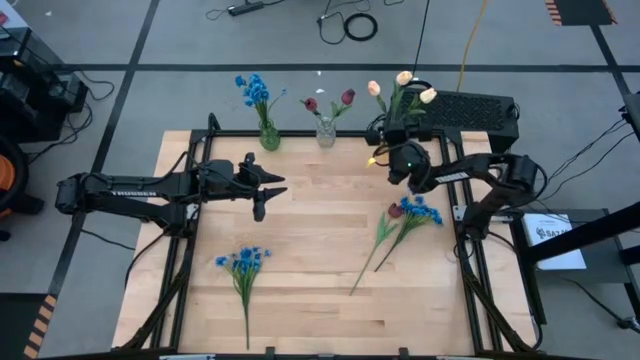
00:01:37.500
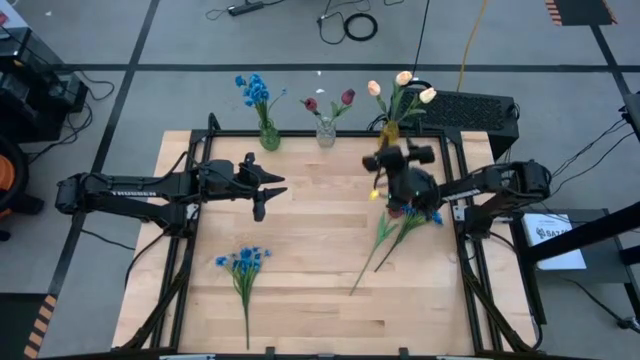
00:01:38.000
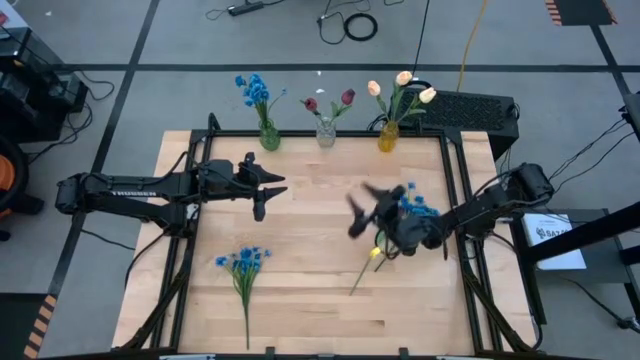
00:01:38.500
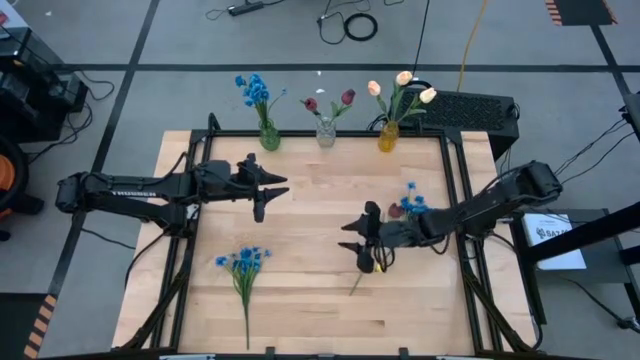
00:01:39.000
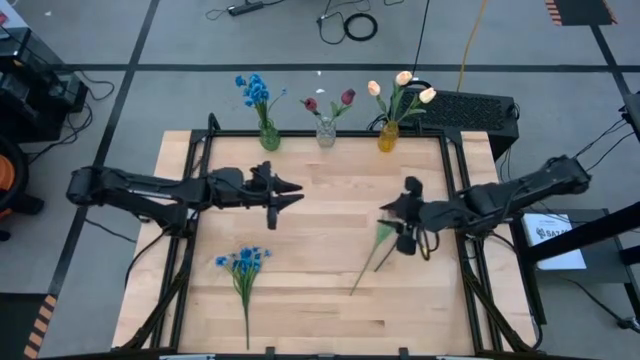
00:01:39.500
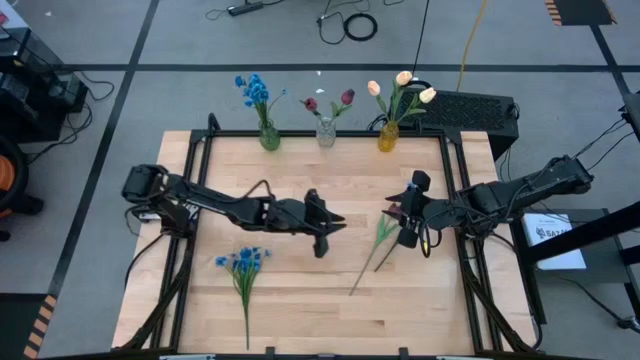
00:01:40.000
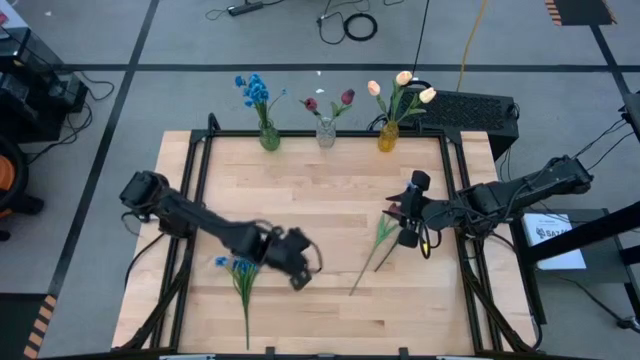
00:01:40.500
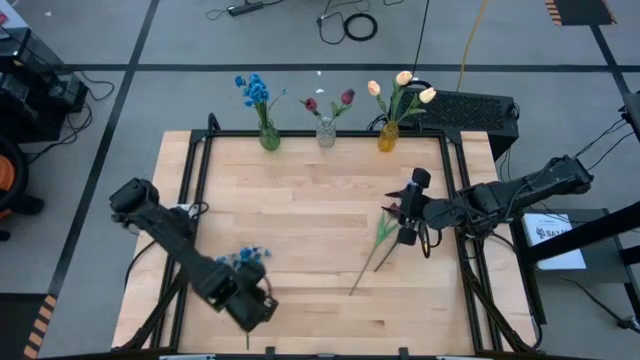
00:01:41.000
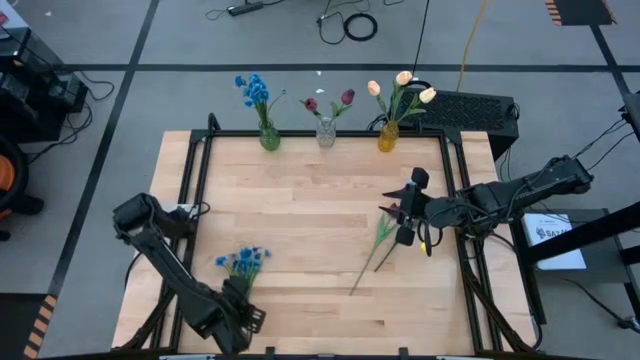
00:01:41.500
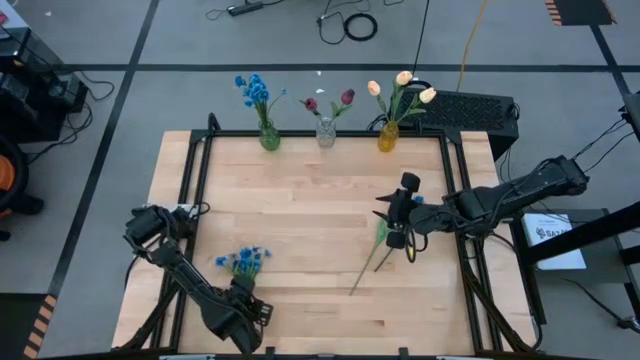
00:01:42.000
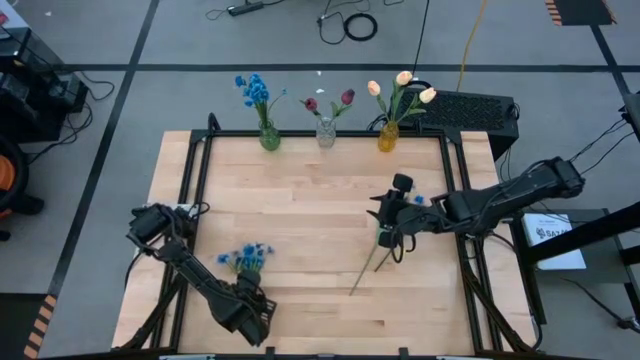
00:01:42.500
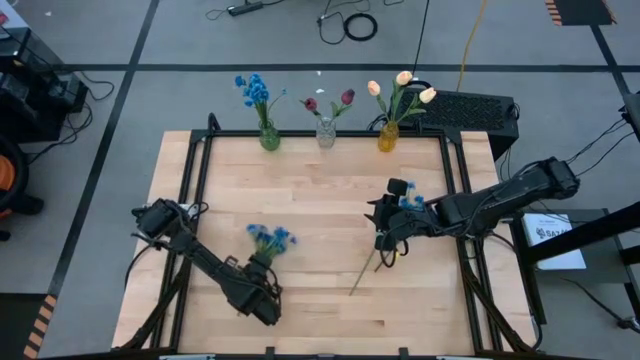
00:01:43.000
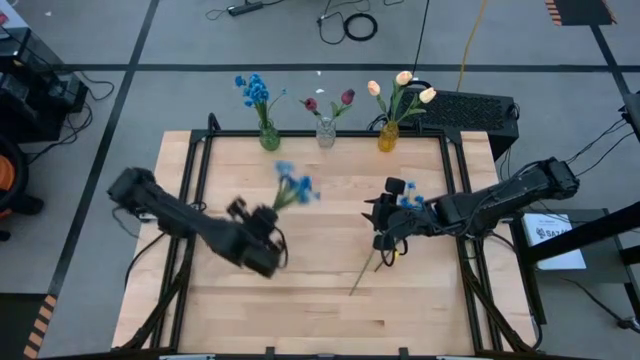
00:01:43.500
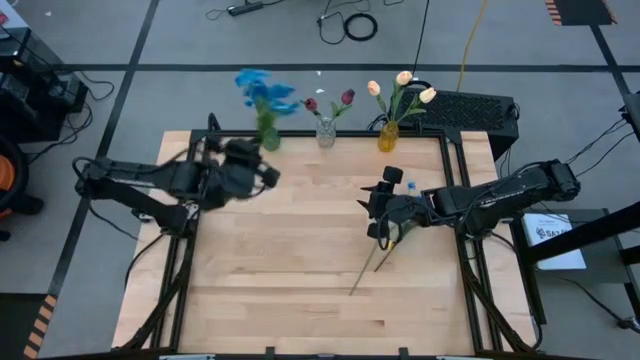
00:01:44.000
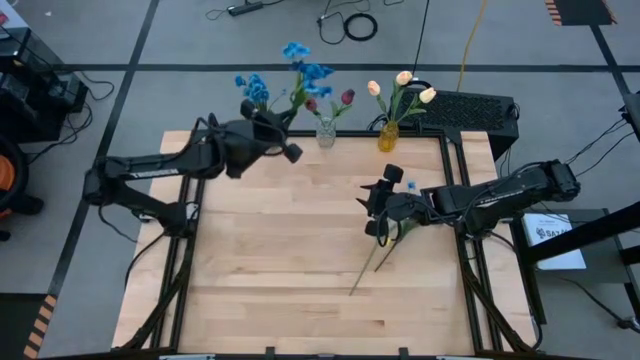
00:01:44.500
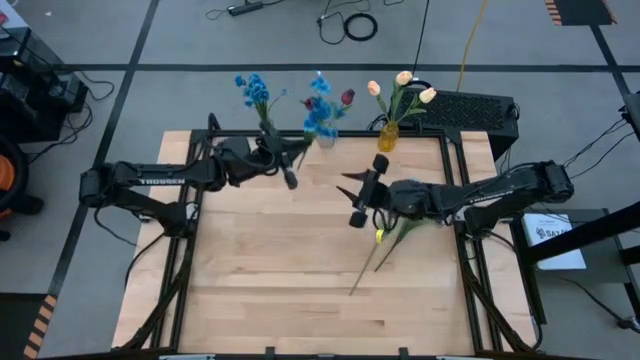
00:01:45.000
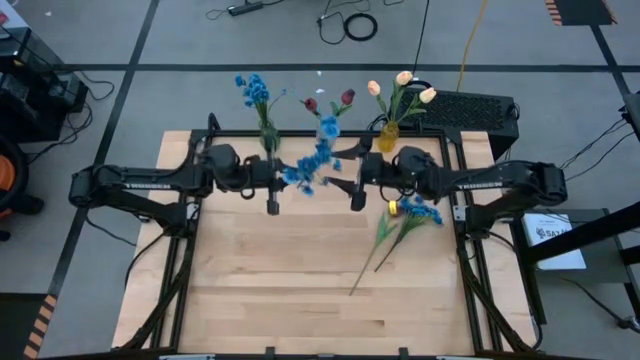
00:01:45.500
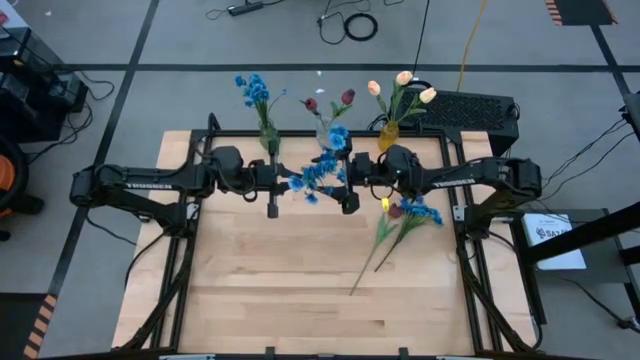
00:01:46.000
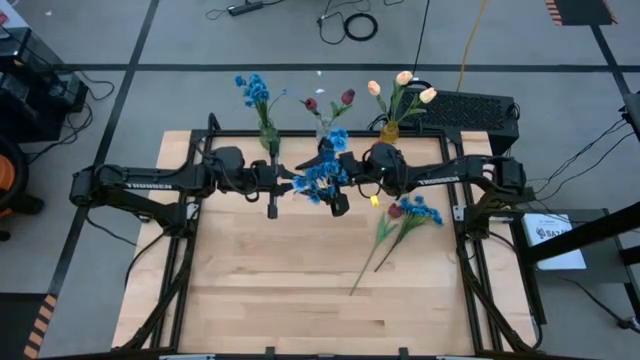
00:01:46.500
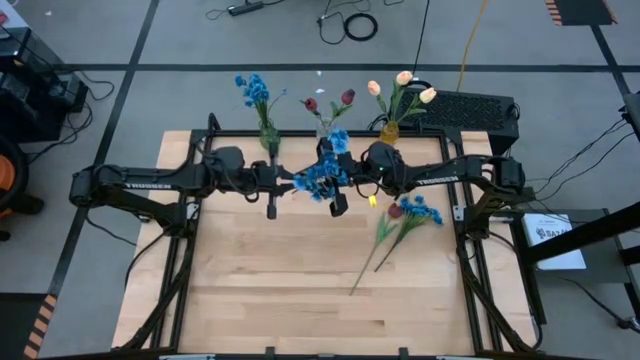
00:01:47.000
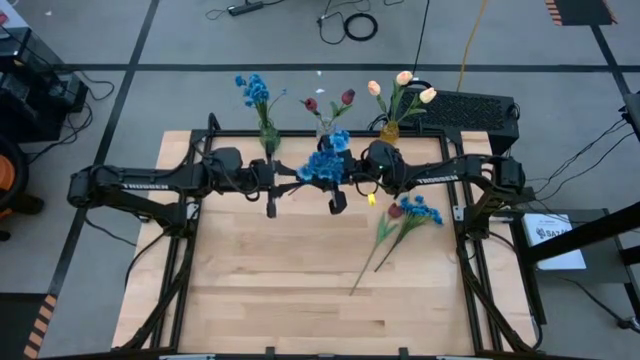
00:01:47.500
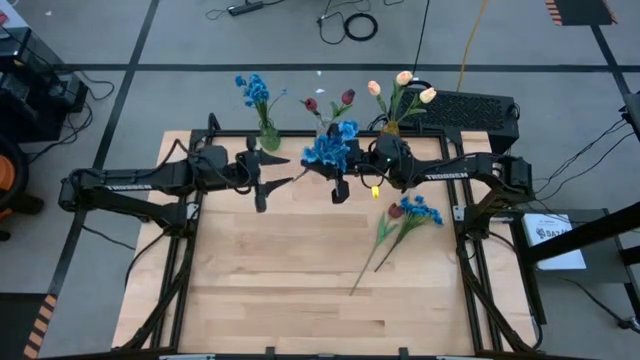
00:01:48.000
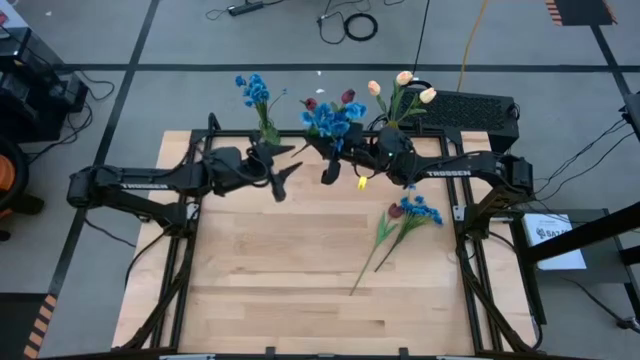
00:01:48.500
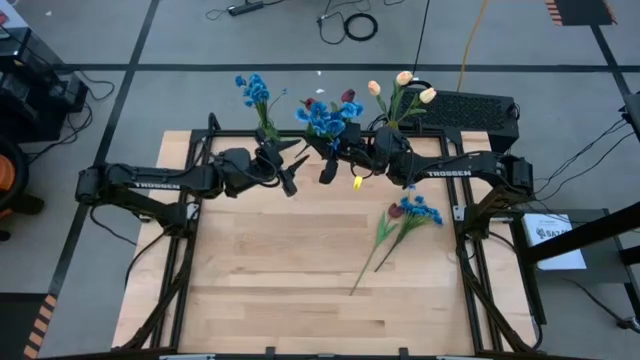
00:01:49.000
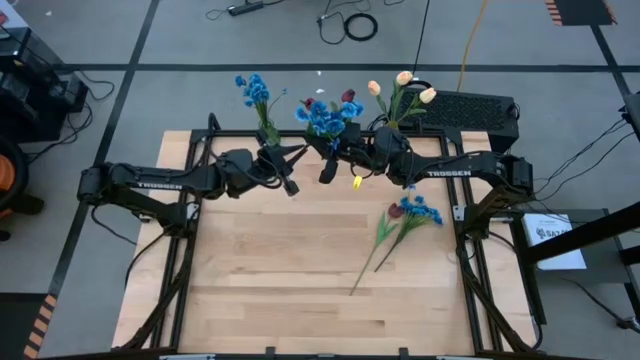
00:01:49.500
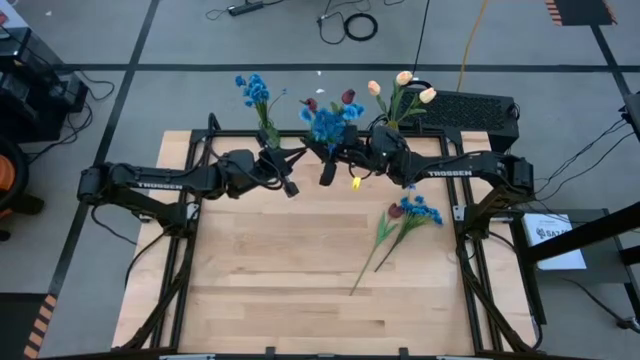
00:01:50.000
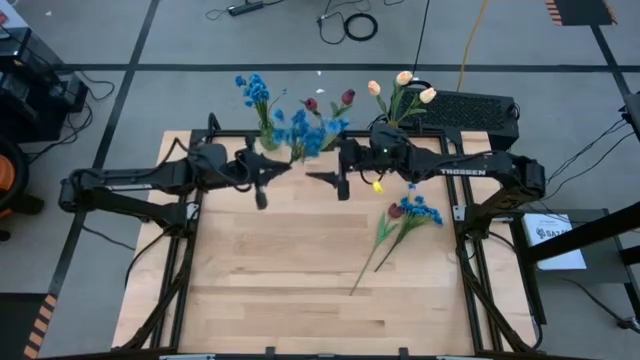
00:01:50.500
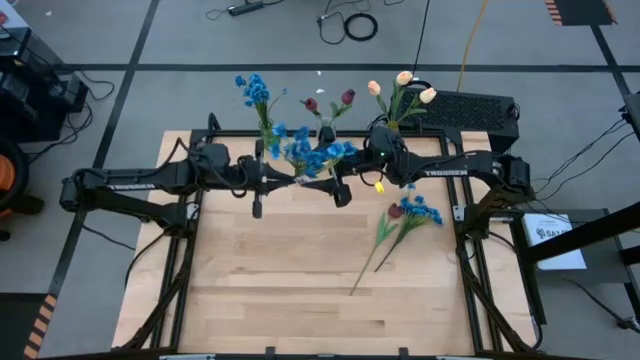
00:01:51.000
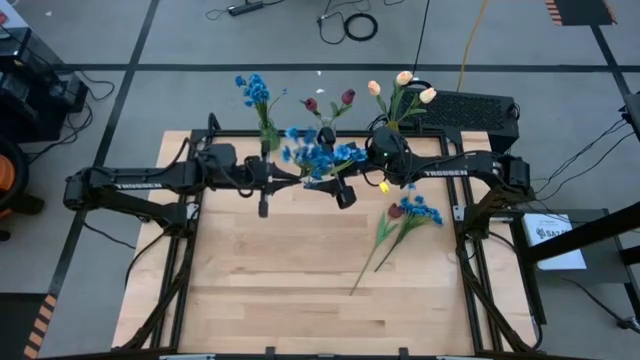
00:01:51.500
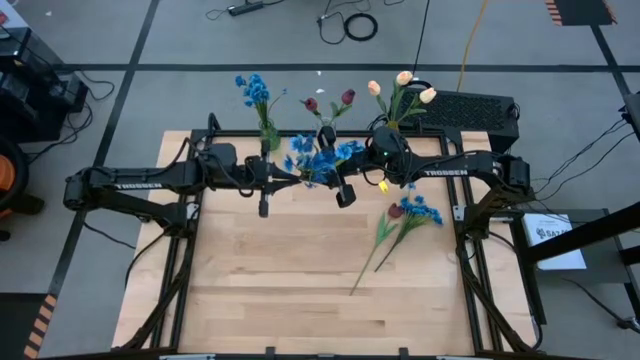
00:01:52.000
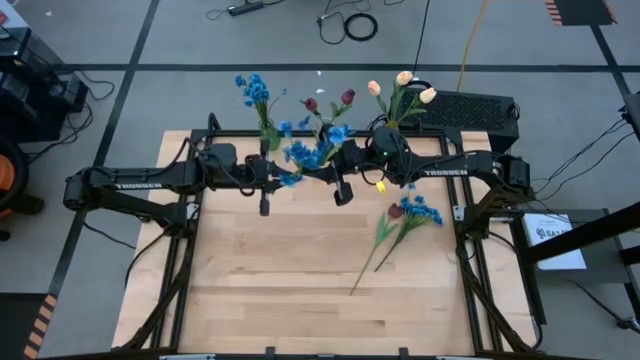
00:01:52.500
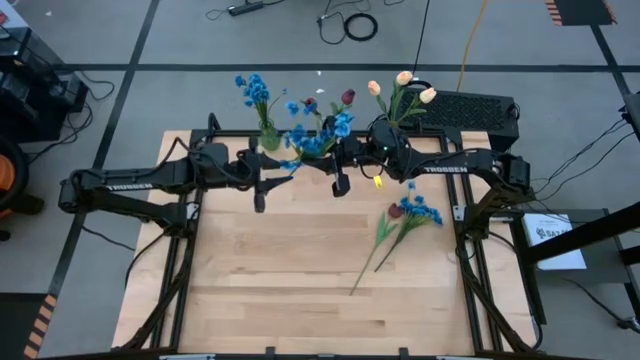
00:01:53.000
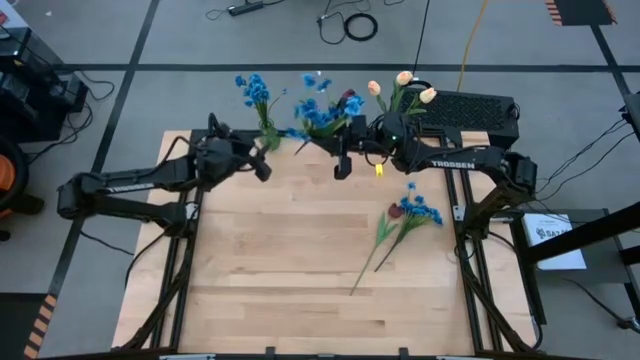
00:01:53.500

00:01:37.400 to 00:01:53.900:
Task: Sort flowers into vase by color
Put the left blue flowers into the green vase

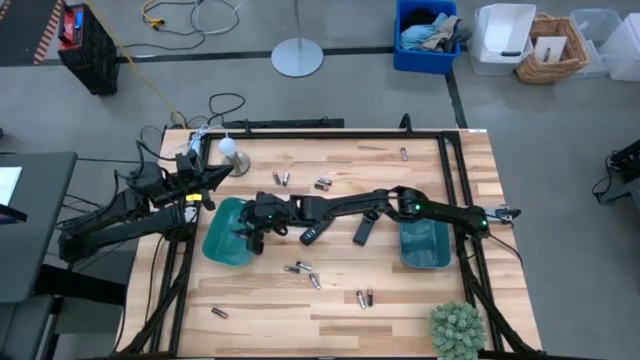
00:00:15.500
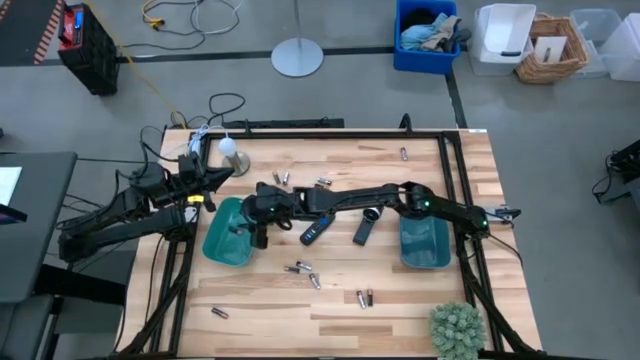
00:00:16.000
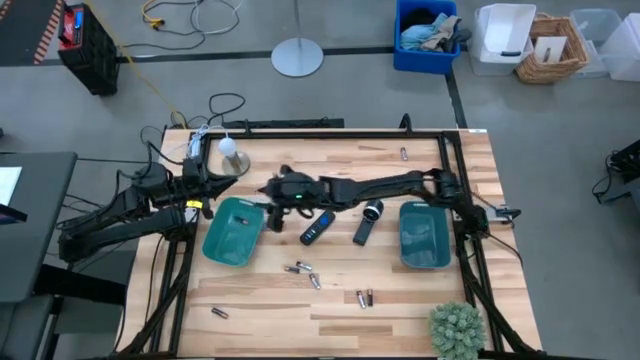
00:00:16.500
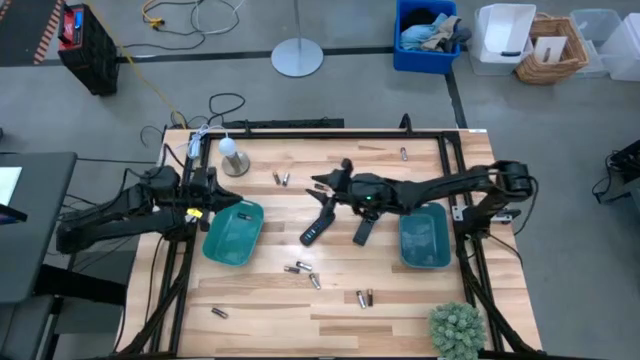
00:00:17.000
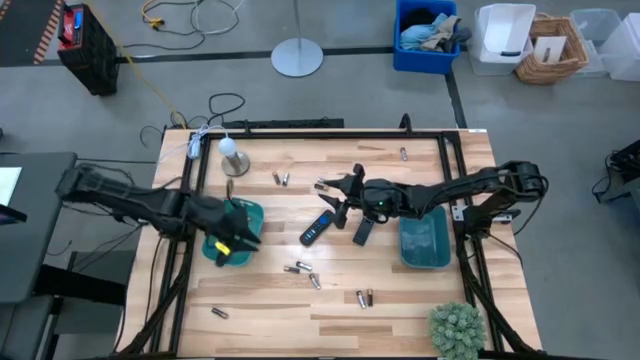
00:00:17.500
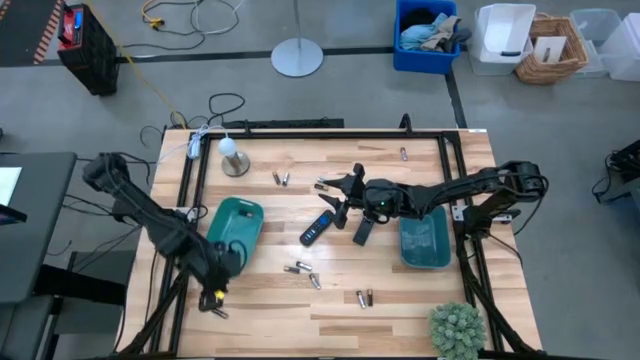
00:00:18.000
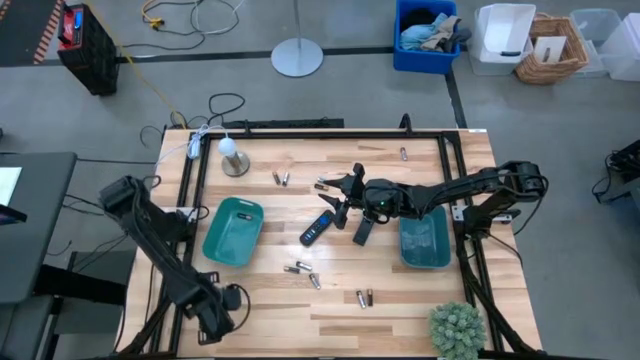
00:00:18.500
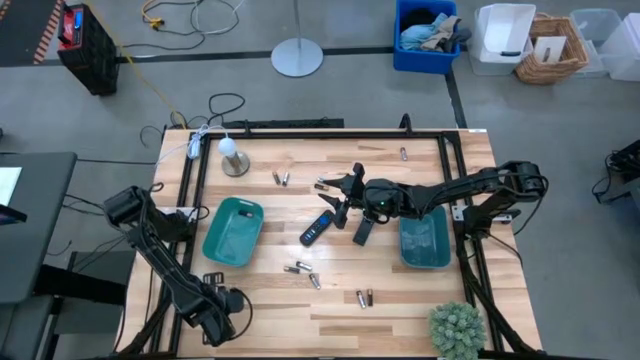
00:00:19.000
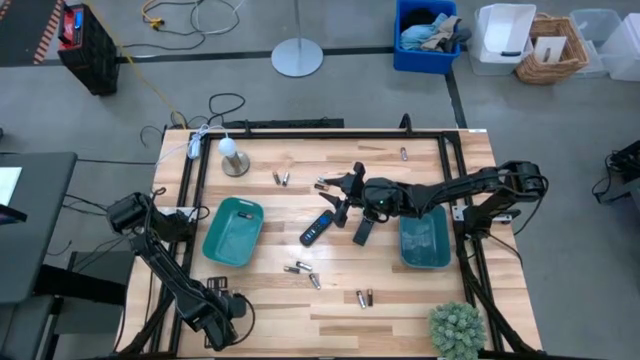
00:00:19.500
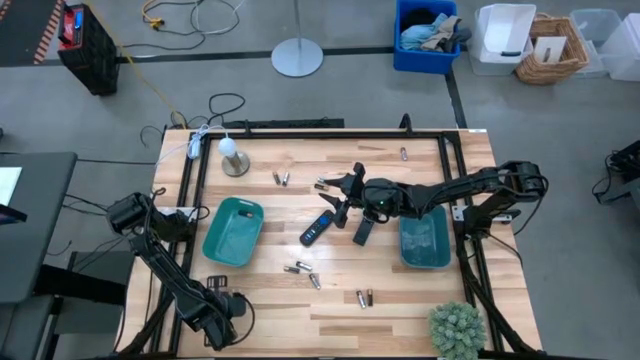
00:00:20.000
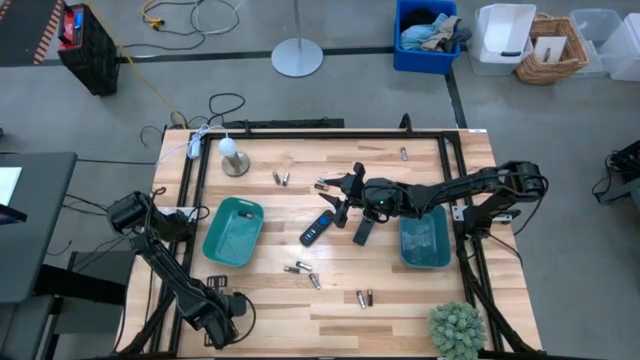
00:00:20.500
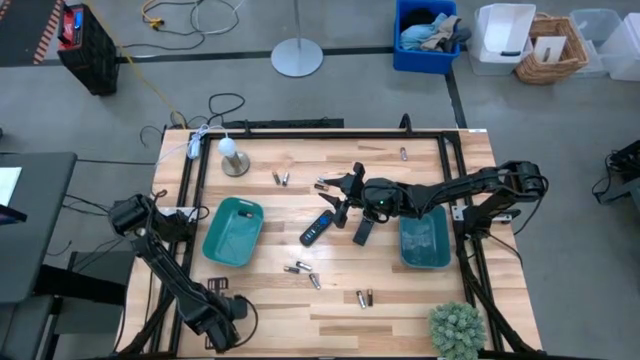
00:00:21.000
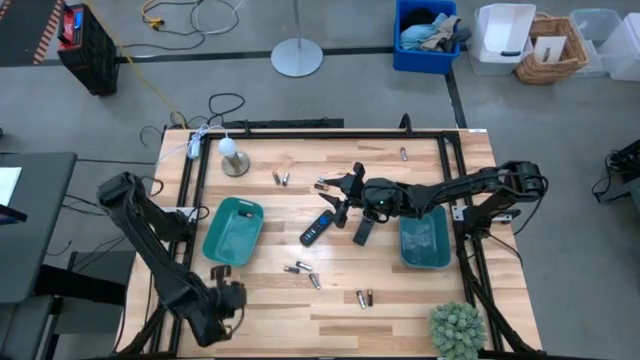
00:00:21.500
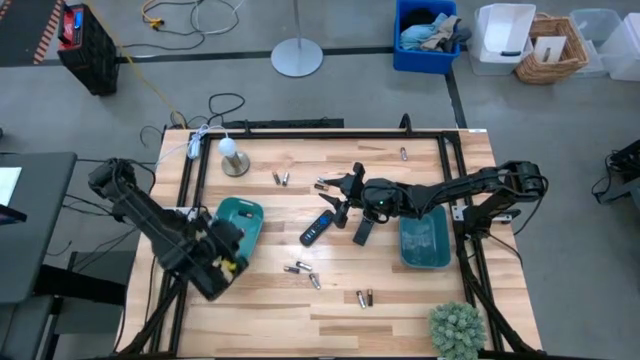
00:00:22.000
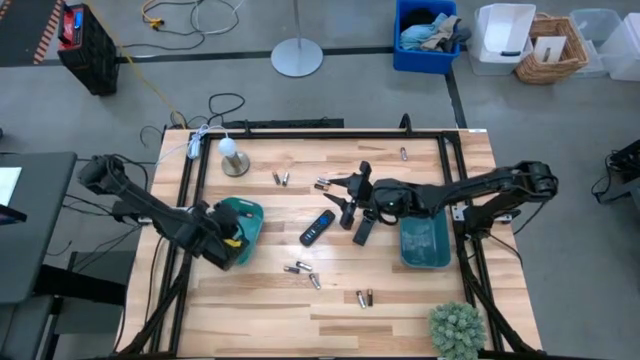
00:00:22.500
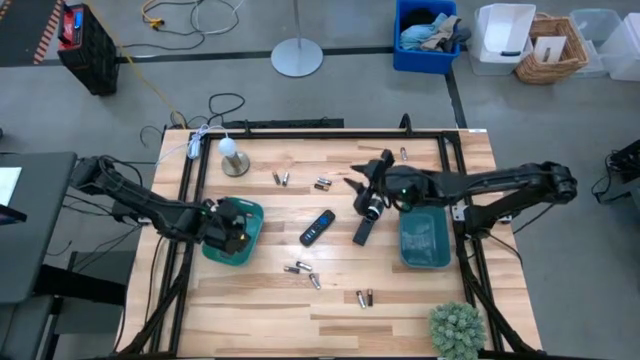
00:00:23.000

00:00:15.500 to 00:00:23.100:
Task: Sort batteries
Put the brown battery into the green bin
